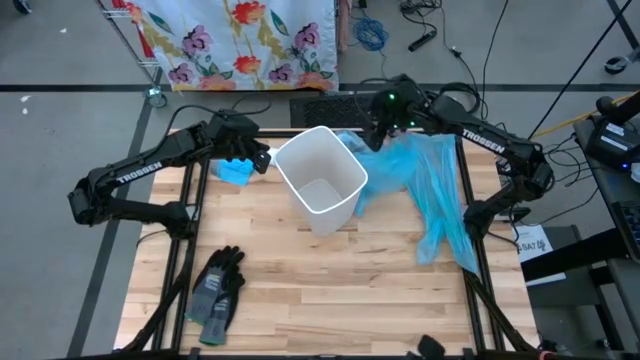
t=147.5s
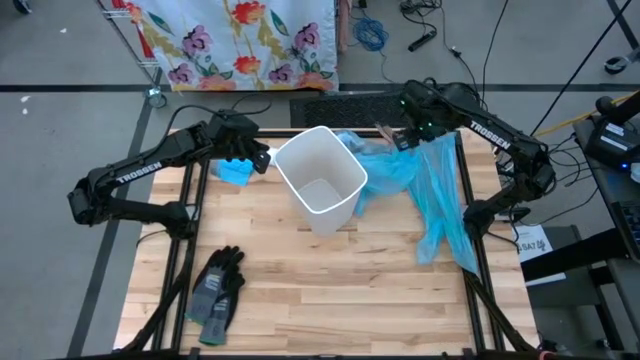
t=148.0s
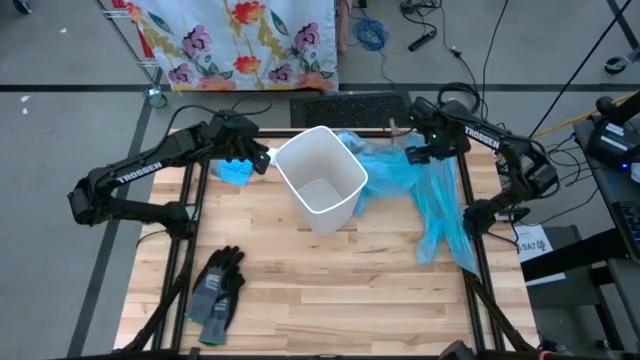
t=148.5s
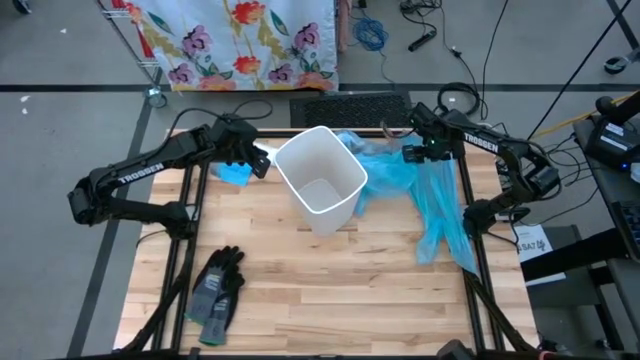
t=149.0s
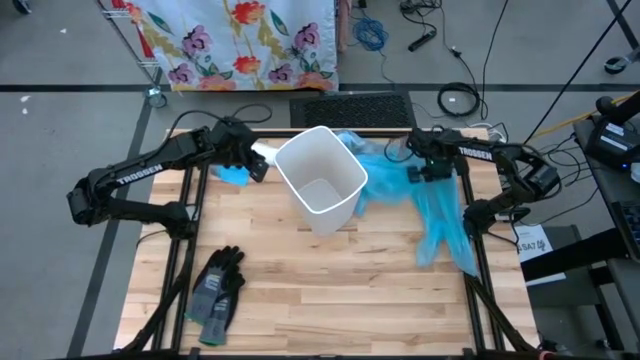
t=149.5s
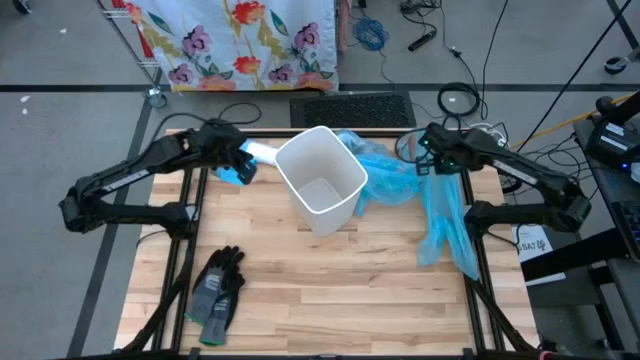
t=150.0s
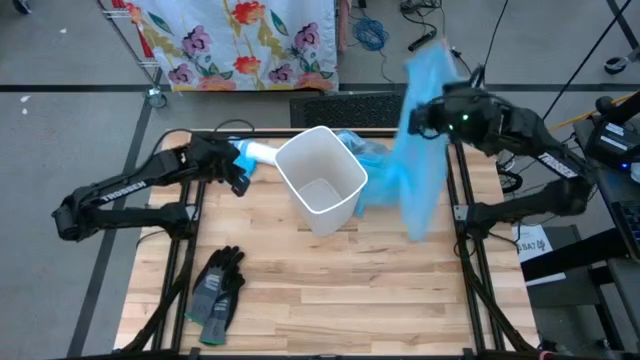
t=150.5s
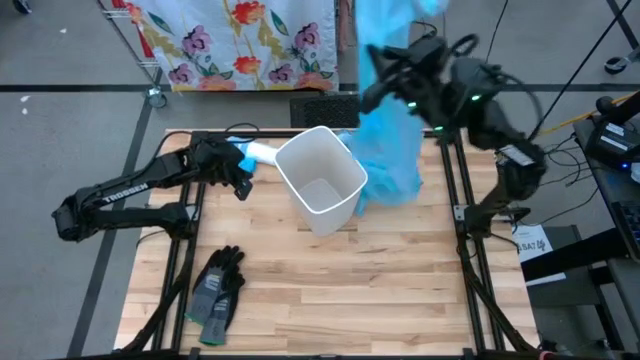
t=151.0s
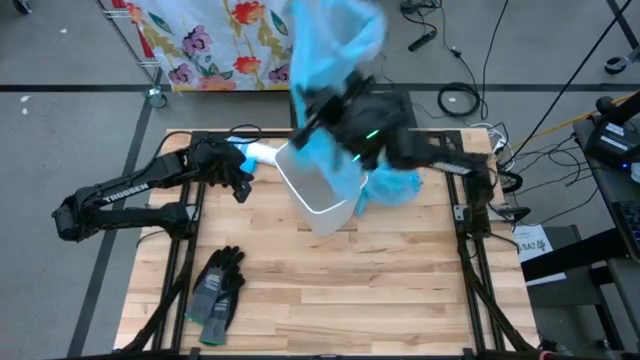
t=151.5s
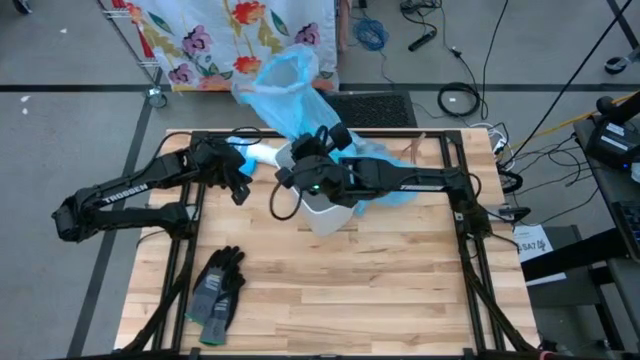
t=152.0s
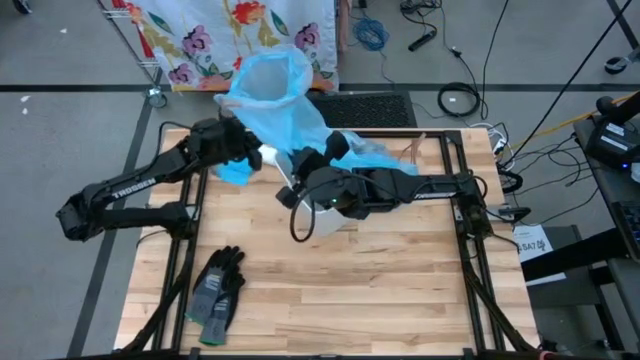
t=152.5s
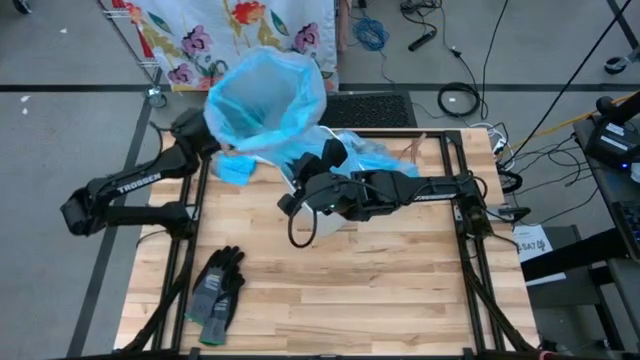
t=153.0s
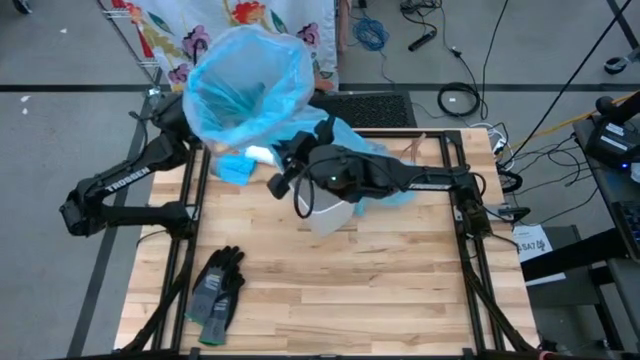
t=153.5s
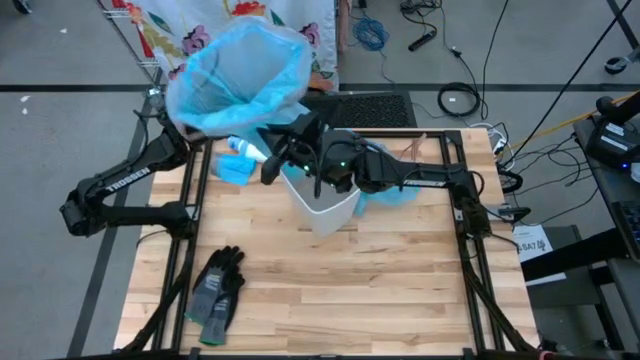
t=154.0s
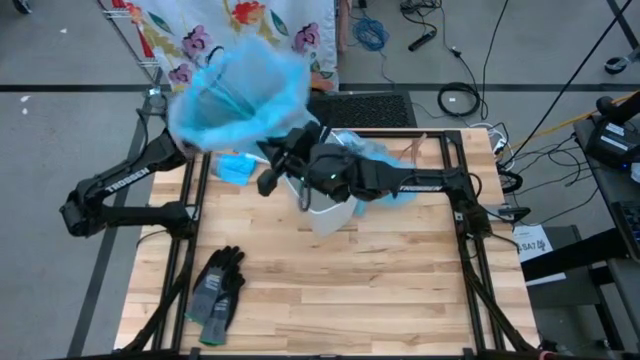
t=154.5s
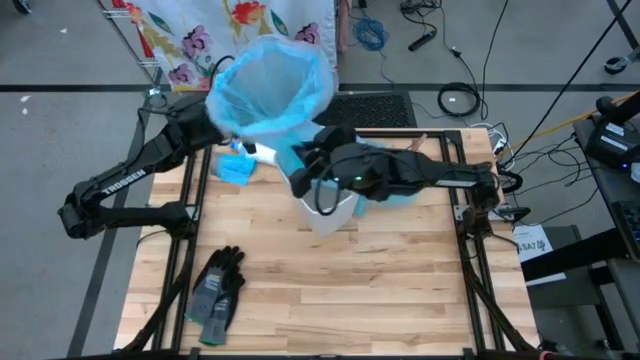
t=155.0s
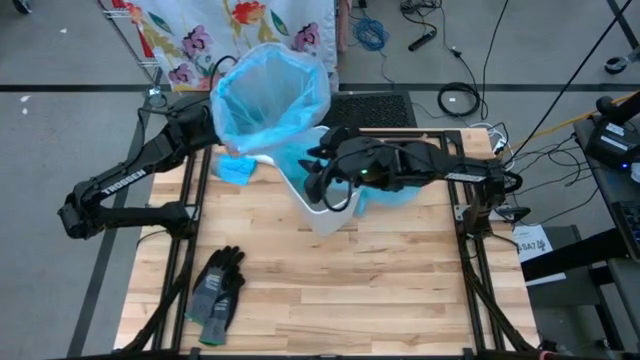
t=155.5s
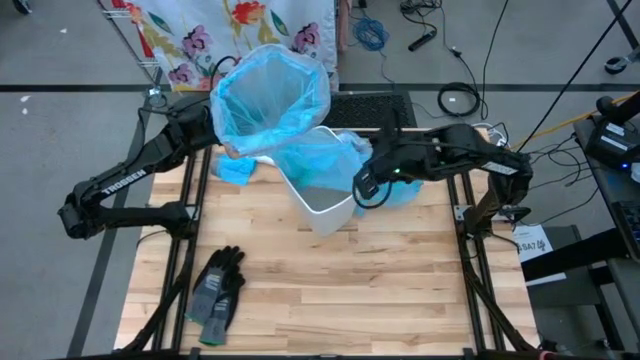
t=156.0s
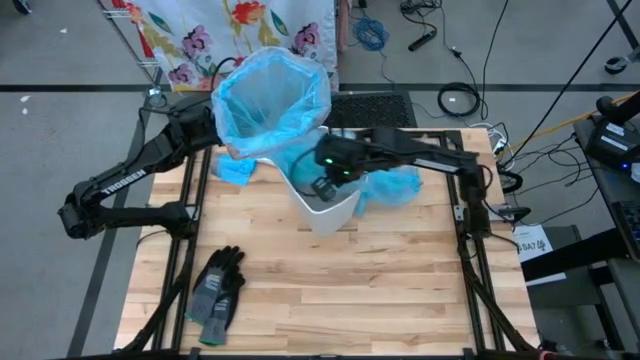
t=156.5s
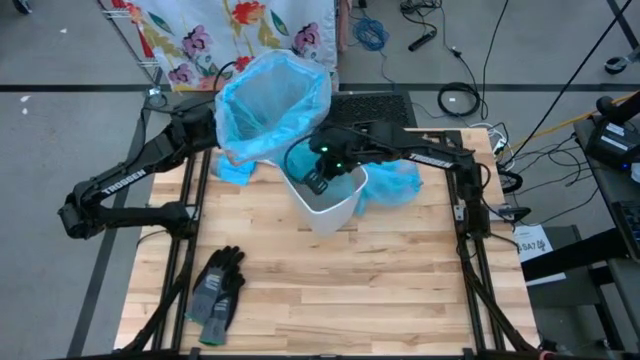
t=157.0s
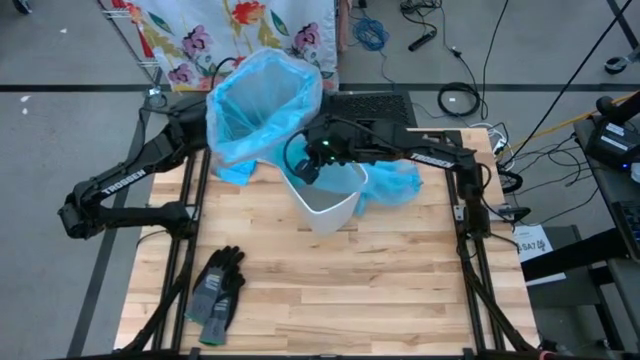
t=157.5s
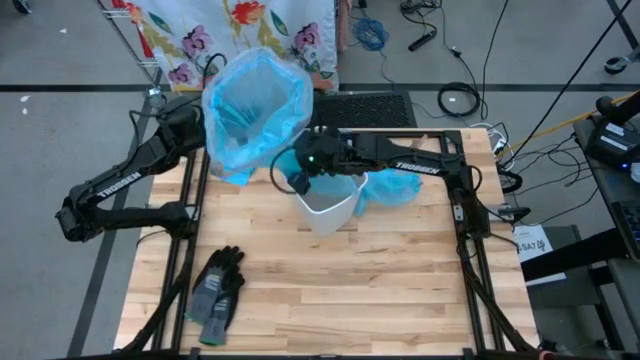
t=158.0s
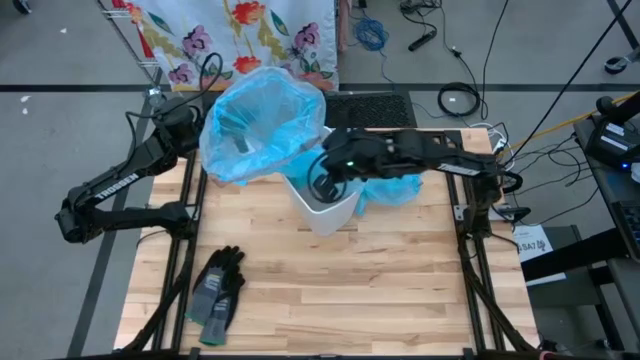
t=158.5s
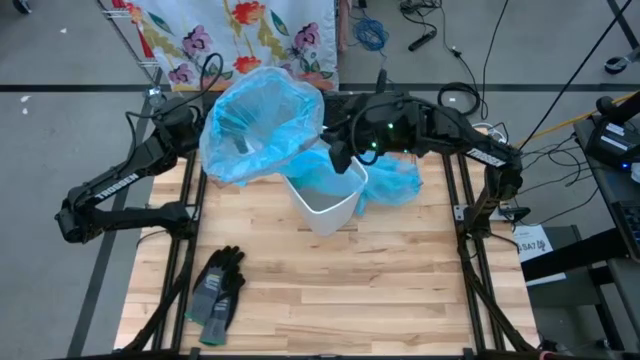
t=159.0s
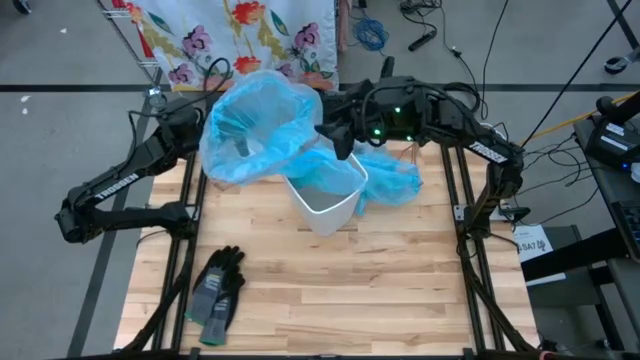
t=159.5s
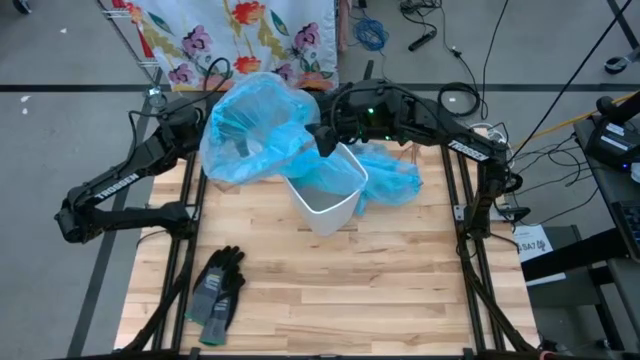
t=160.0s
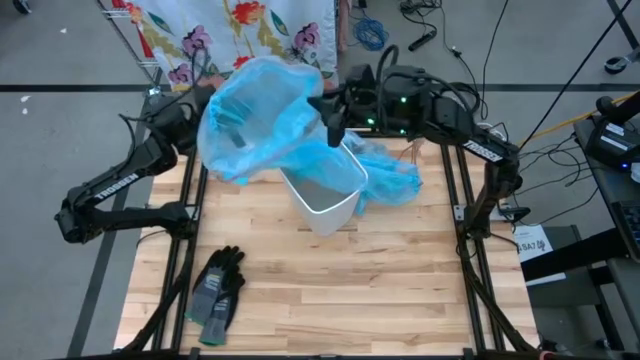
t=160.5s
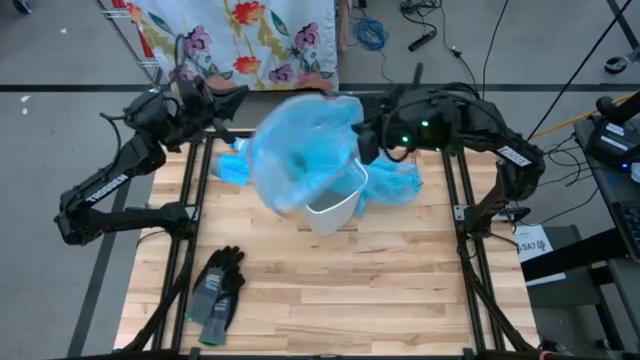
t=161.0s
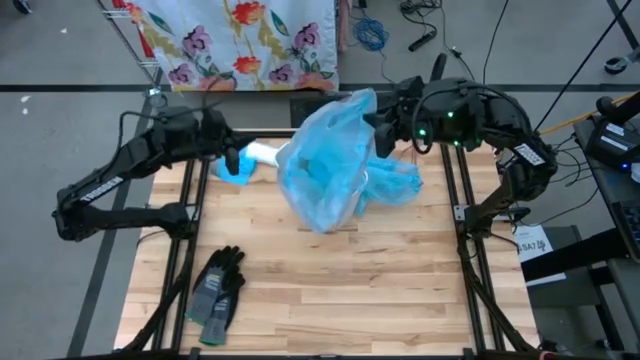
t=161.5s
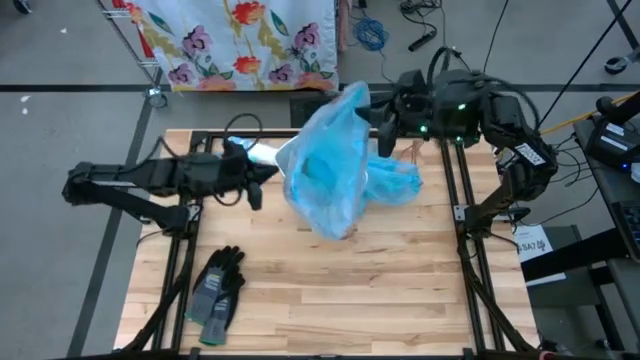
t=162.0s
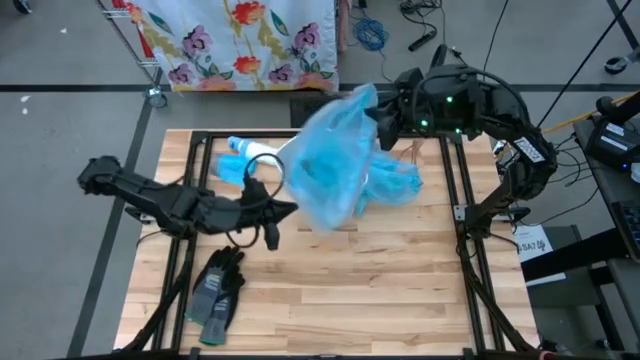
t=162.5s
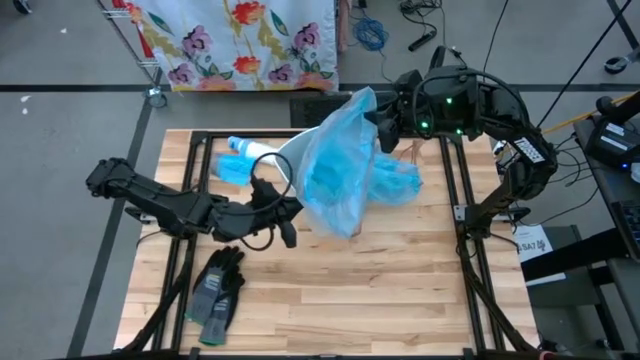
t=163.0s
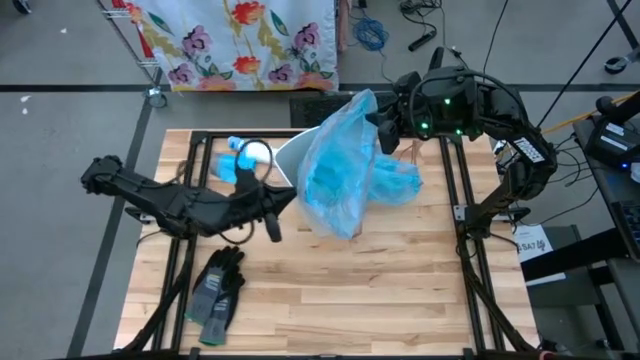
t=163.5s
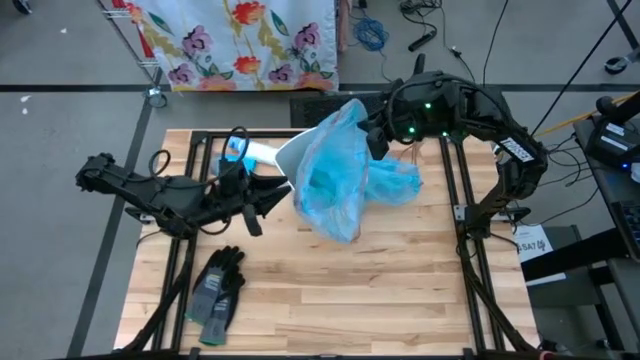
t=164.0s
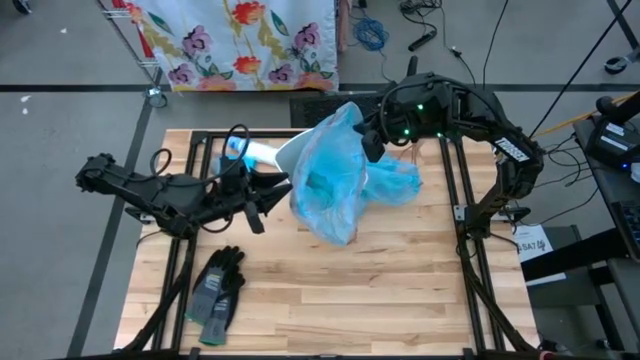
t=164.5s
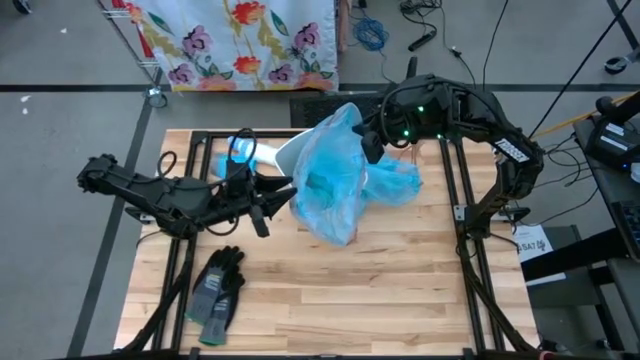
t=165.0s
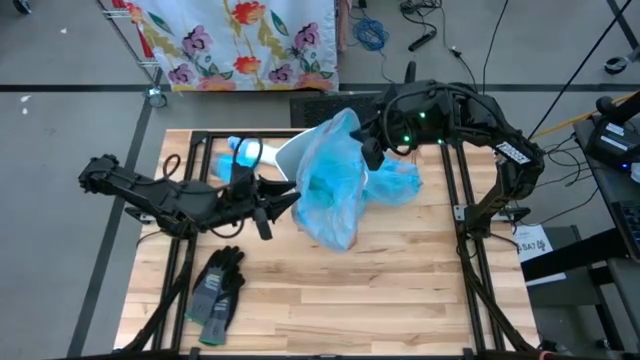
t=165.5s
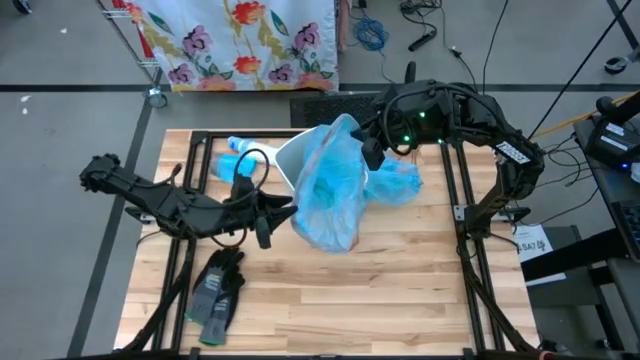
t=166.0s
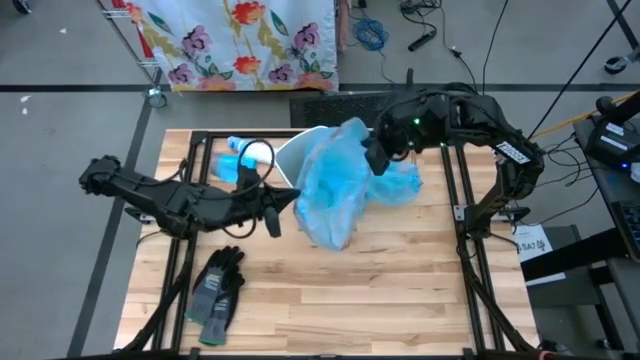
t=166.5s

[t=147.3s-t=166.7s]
Task: place trash/remove bag and relplace
Put the trash bag into the trash bin

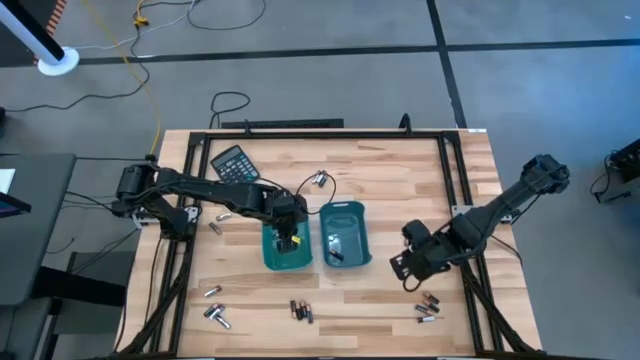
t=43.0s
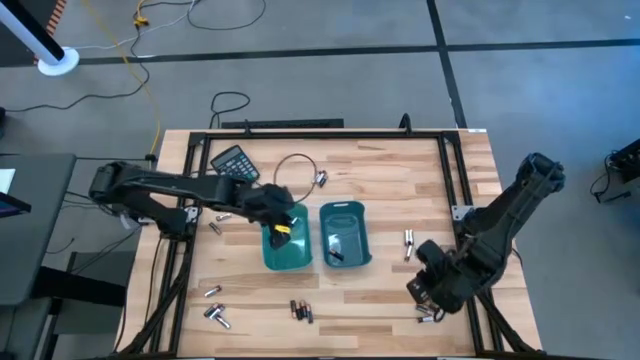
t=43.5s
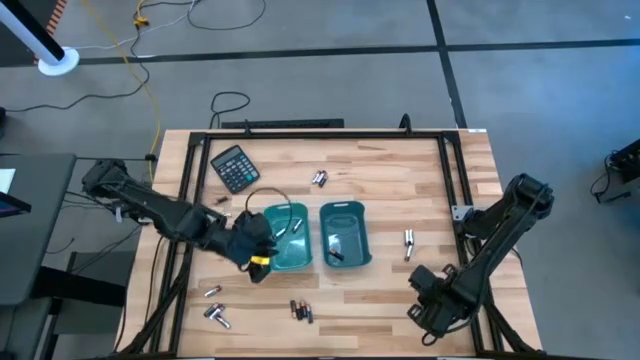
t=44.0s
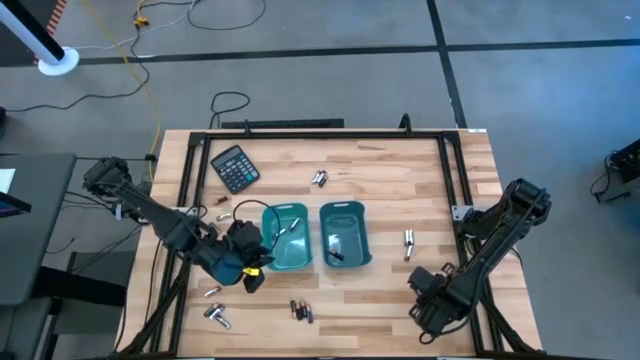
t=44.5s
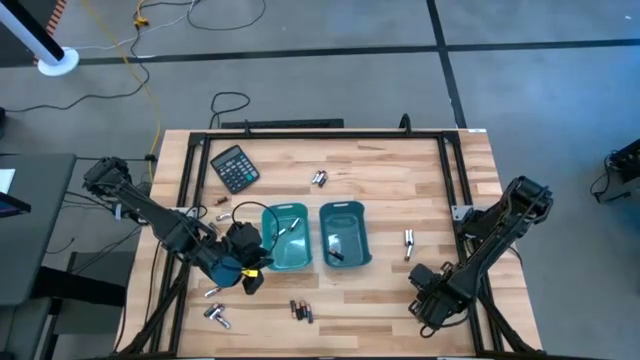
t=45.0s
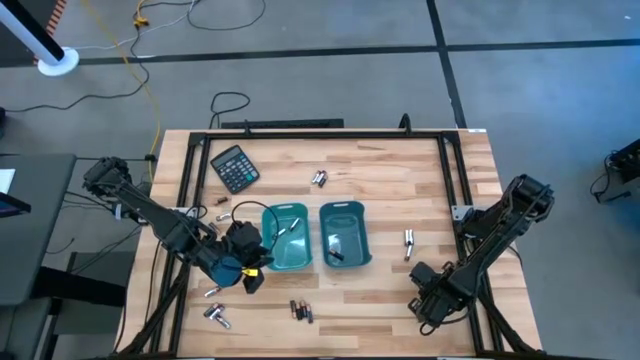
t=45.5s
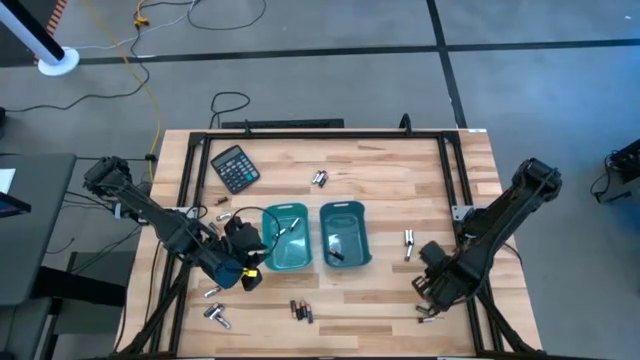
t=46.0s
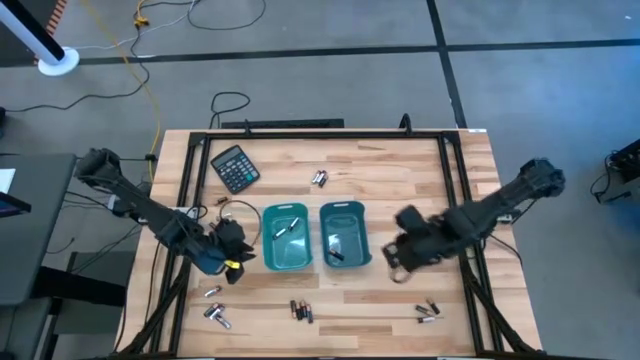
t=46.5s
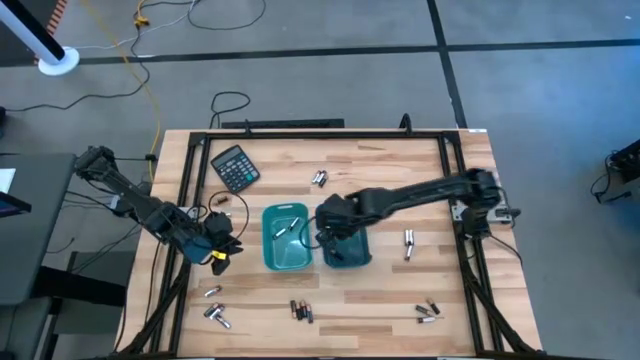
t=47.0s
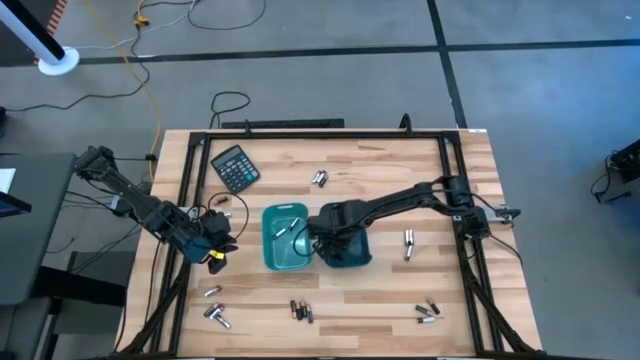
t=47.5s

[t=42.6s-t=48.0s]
Task: Sort batteries
Put the black battery into the blue bin
